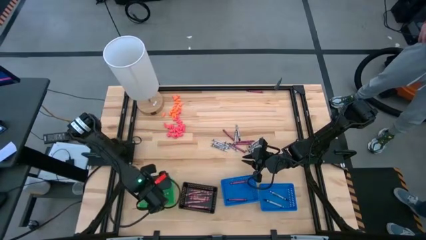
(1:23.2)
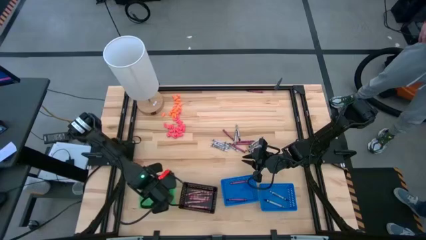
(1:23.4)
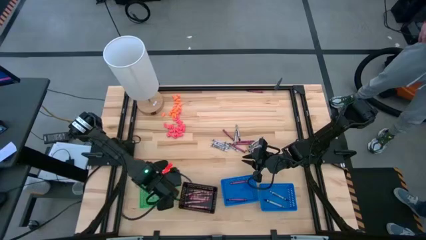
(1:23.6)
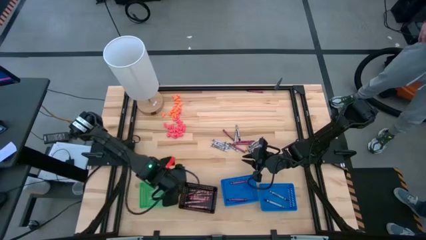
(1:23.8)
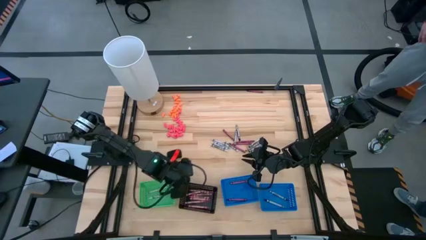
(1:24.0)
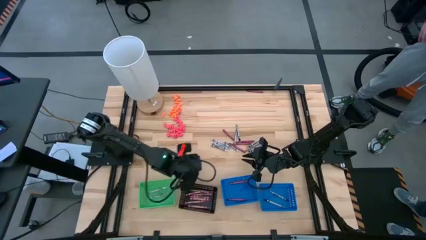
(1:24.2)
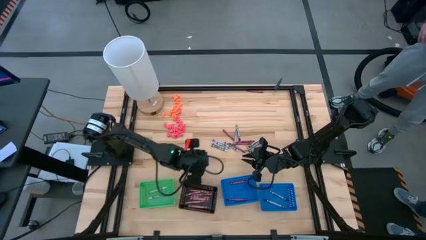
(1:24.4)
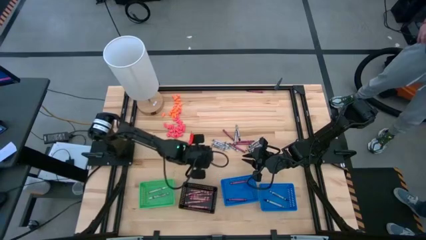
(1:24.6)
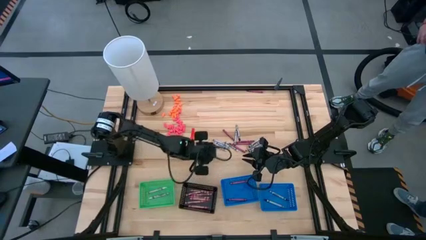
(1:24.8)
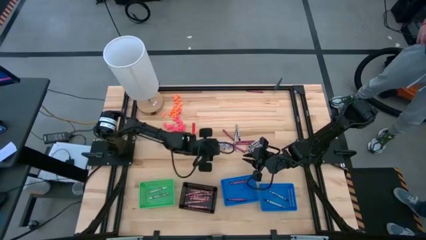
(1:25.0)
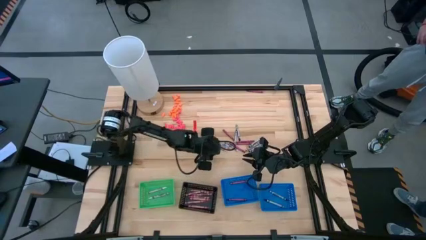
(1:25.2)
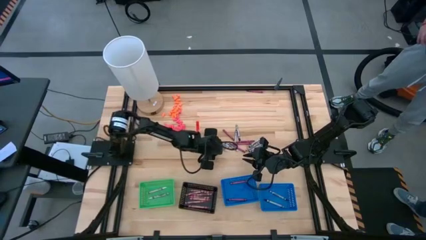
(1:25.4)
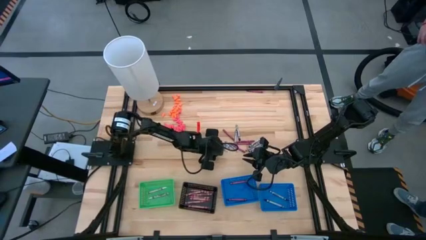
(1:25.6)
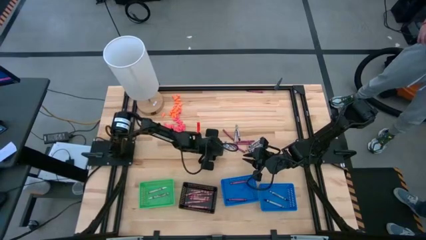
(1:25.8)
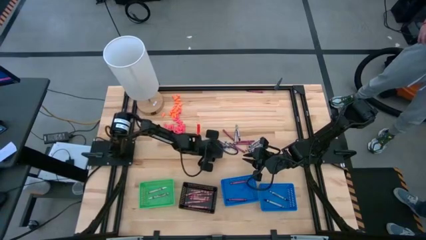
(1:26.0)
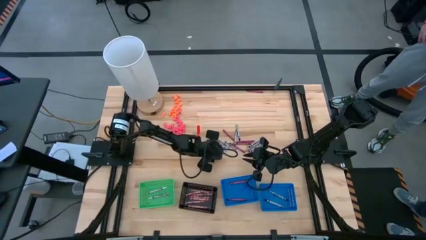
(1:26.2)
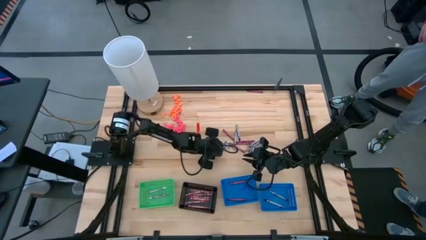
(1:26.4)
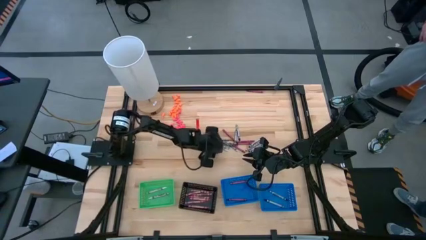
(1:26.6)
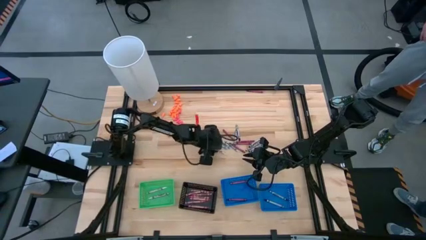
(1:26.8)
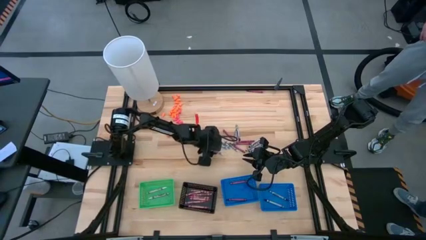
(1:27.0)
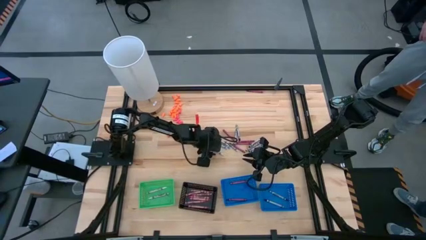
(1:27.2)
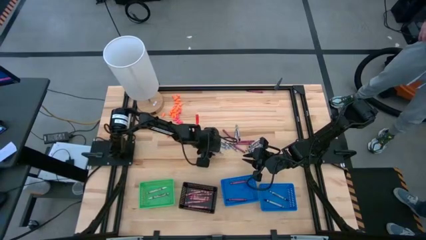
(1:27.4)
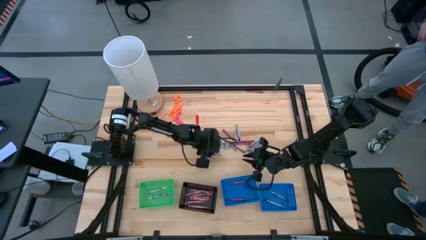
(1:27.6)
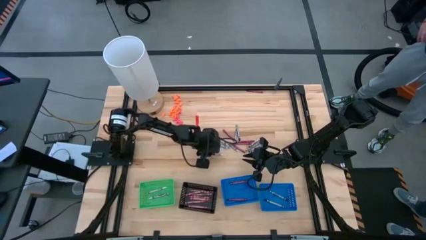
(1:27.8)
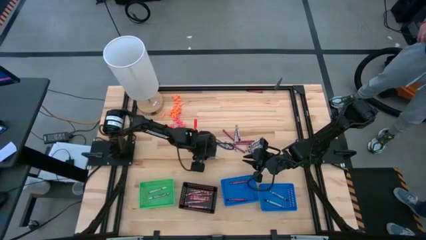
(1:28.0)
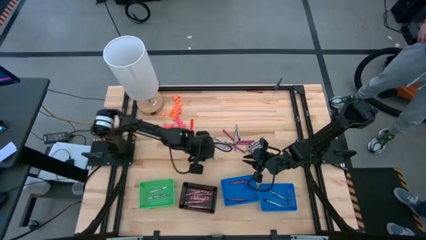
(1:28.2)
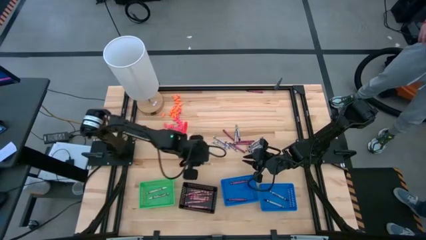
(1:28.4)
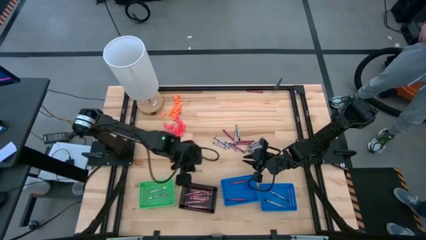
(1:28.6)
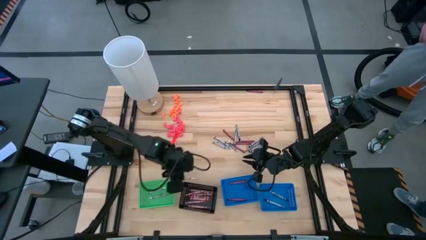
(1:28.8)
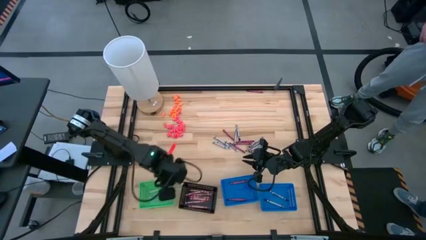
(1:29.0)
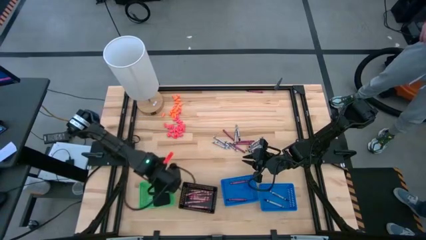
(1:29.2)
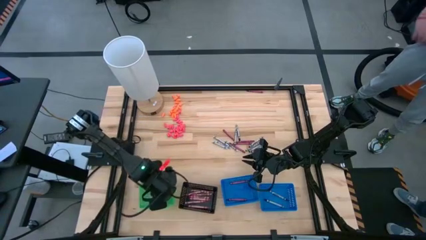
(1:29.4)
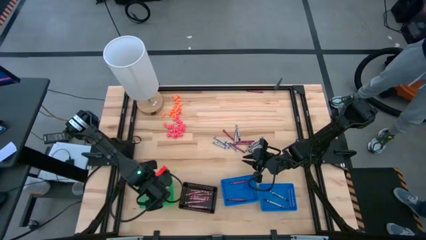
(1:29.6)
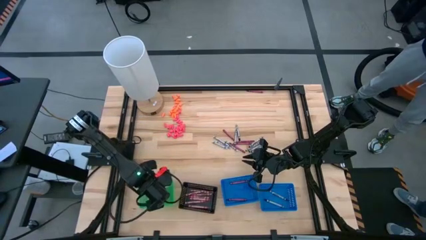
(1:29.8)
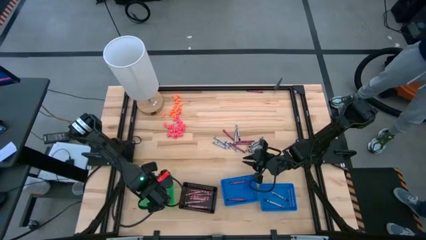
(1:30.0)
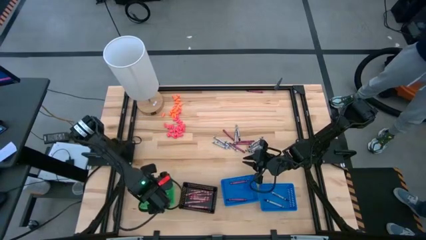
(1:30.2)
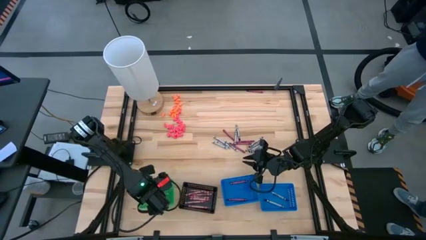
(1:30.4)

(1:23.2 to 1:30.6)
Task: Sort crayons
Put the white crayon into the green bin

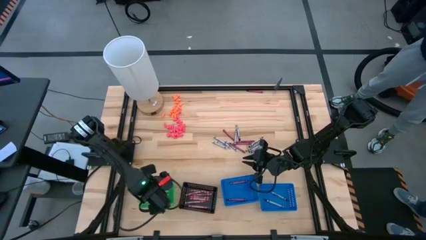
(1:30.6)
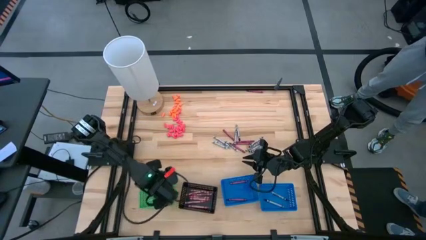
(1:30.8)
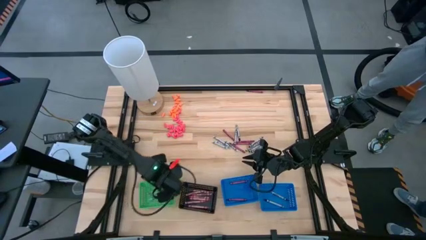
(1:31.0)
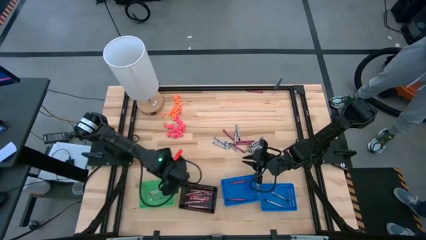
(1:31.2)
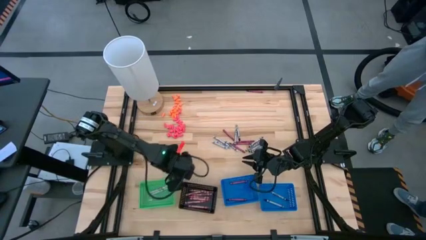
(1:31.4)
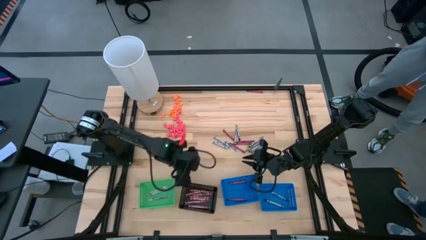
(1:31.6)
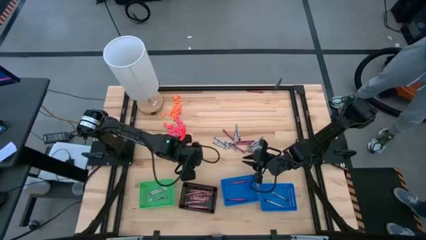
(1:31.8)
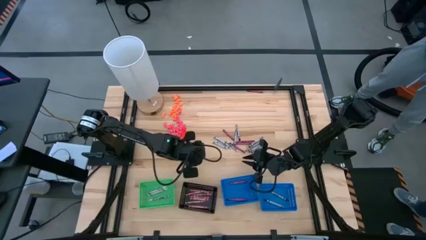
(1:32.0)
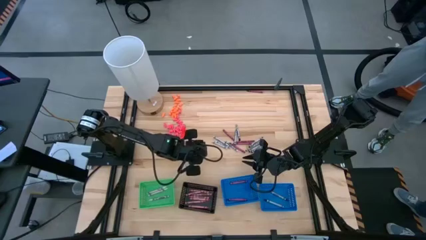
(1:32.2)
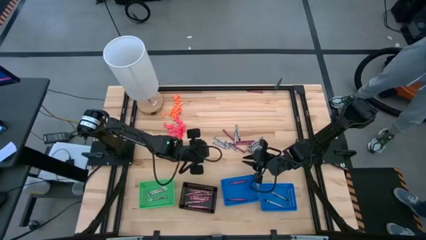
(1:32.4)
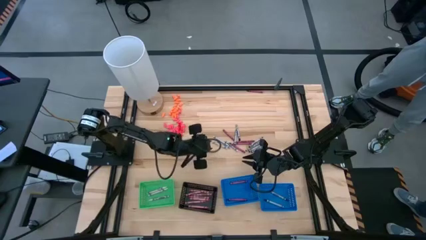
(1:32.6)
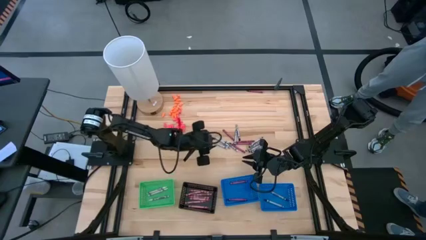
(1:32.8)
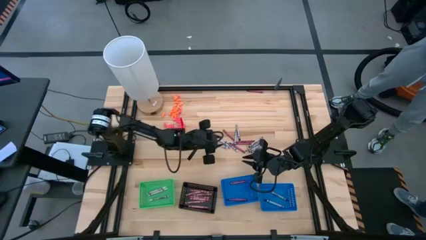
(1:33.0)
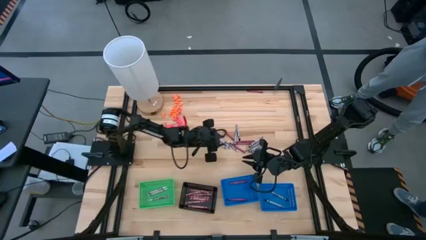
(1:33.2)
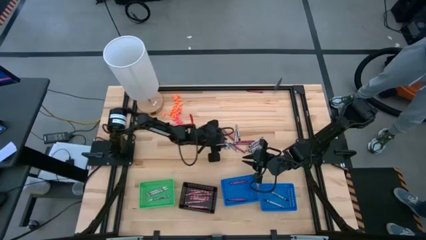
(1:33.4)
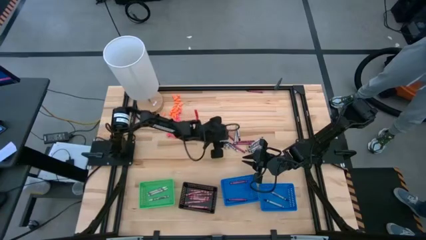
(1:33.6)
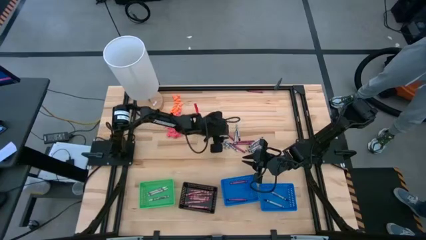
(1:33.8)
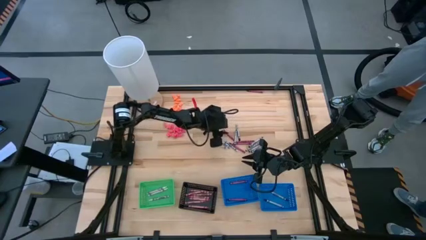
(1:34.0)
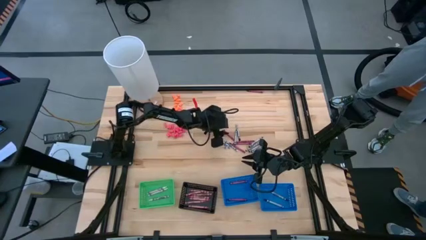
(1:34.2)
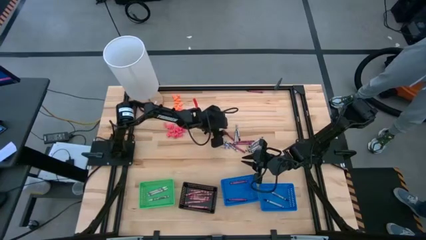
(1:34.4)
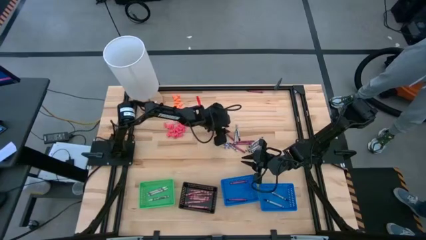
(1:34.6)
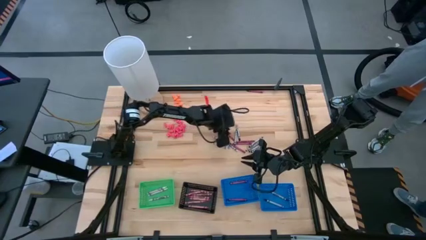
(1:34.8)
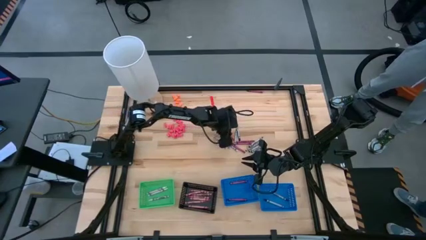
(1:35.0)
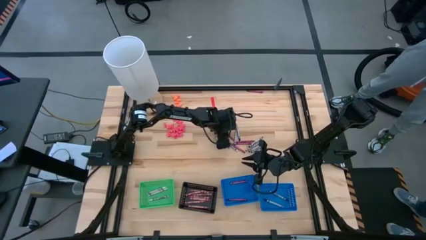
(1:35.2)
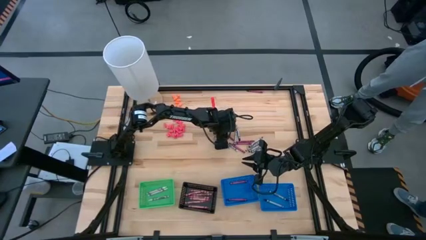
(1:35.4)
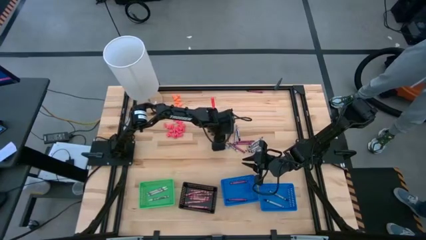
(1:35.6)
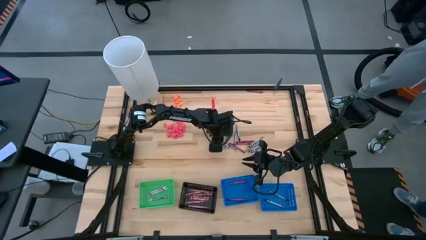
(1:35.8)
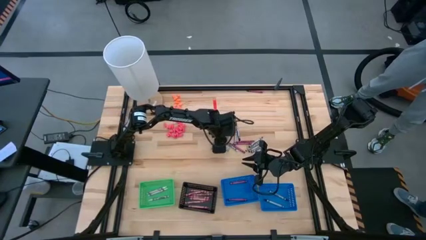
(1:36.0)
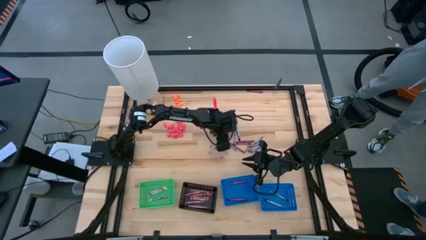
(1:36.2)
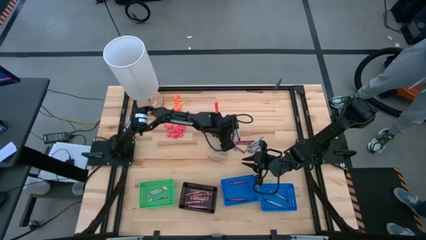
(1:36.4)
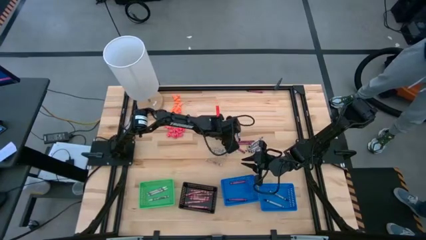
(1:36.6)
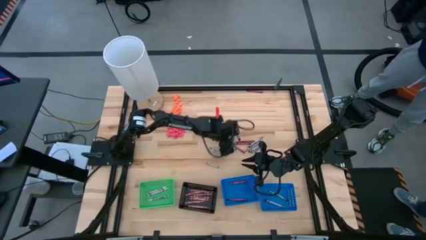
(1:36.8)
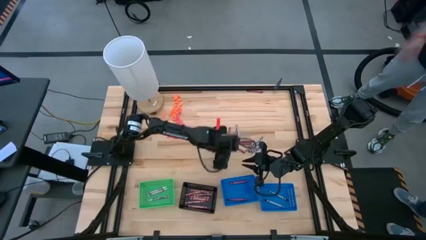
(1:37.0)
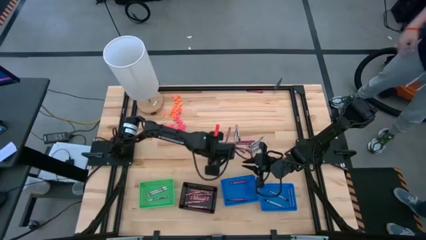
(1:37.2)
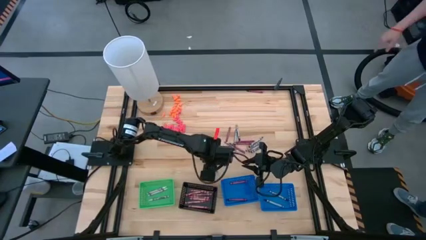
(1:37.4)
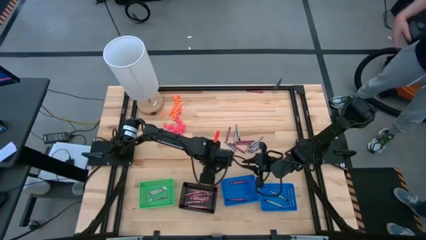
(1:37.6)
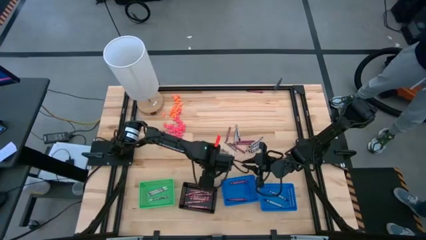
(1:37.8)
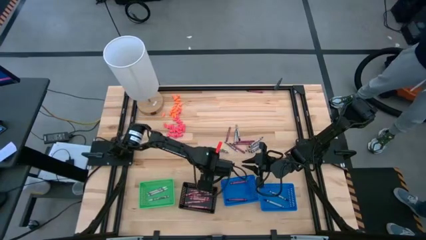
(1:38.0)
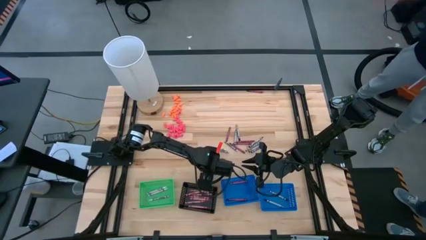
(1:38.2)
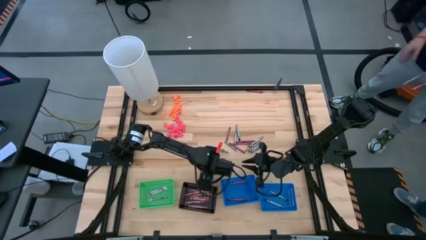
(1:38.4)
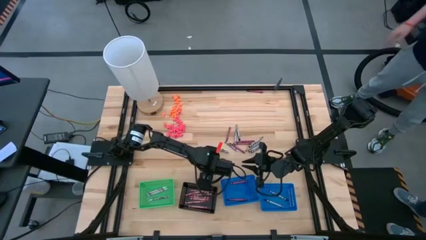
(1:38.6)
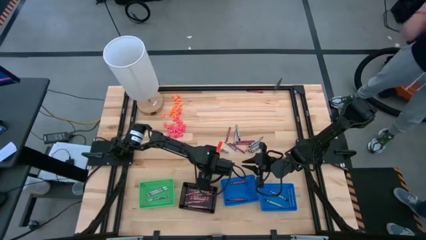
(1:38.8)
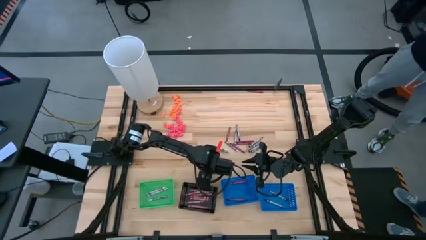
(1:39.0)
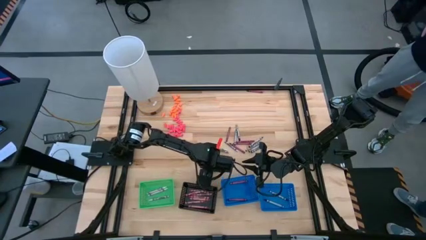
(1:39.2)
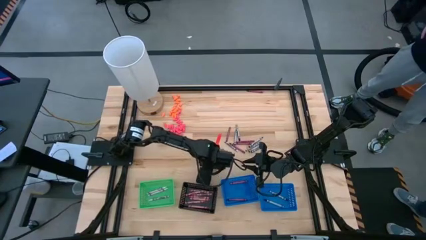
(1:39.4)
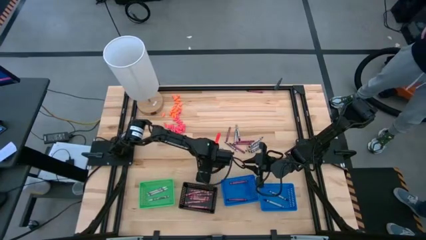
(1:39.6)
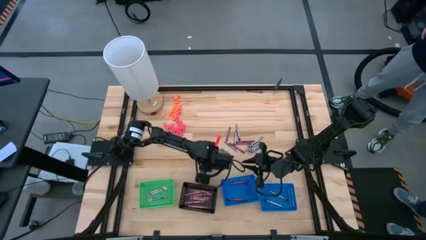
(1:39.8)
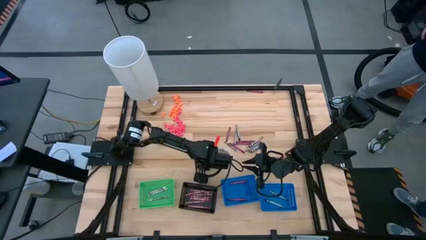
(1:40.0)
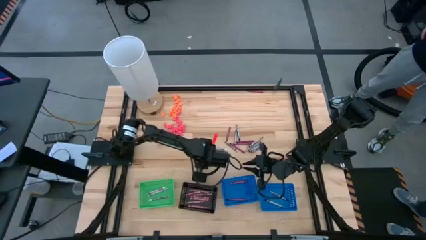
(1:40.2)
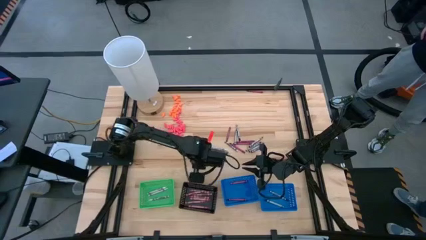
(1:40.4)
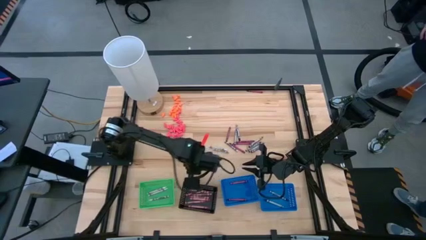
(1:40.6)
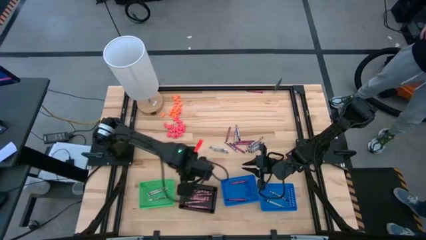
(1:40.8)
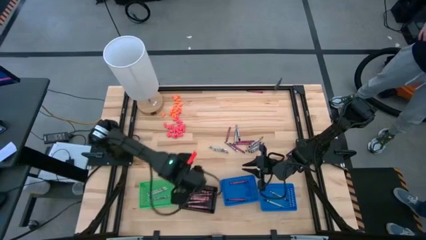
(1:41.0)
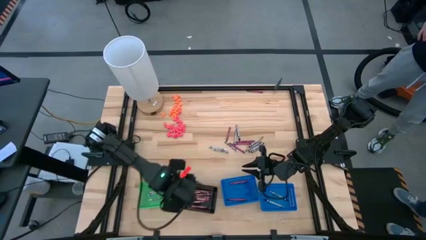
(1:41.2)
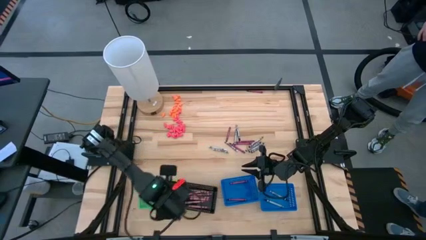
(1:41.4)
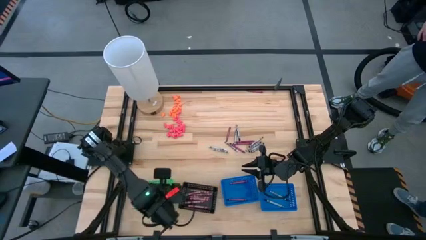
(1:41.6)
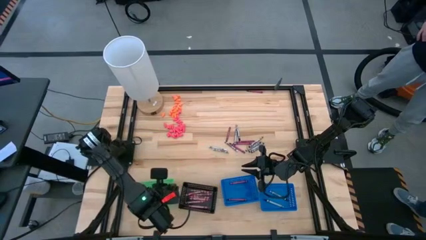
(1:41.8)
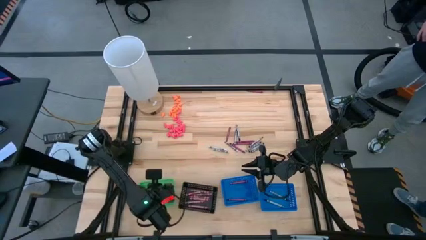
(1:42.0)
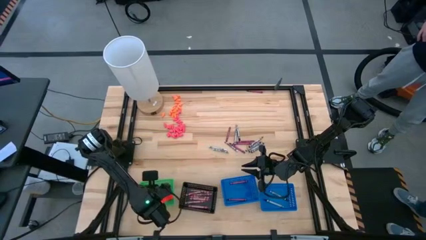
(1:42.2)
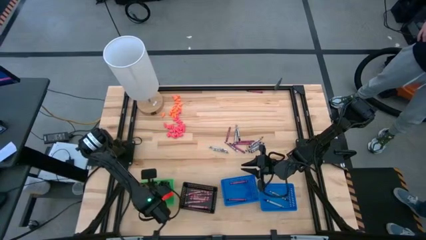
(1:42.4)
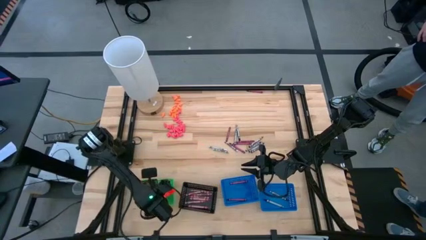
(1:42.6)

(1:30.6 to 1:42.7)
Put the white crayon into the green bin
